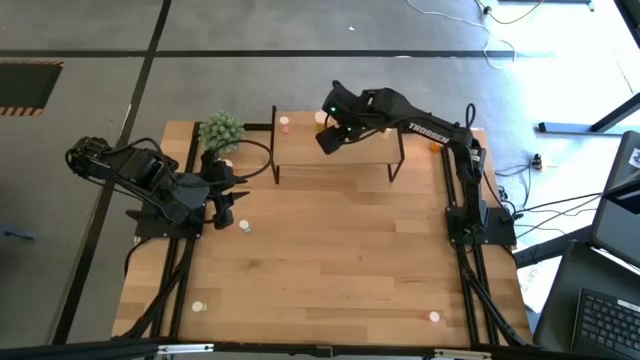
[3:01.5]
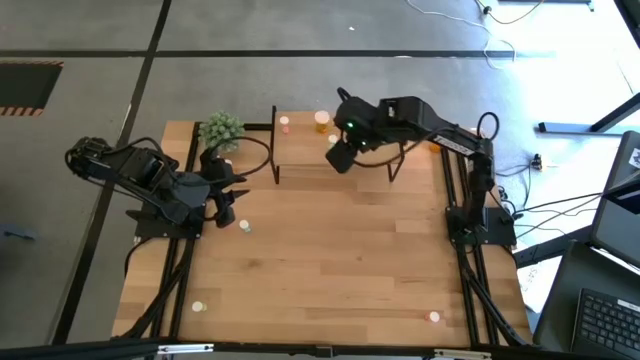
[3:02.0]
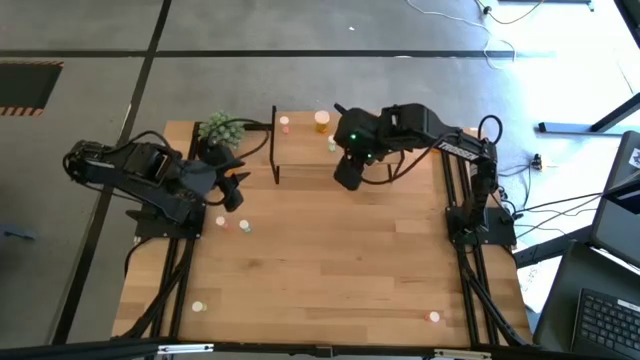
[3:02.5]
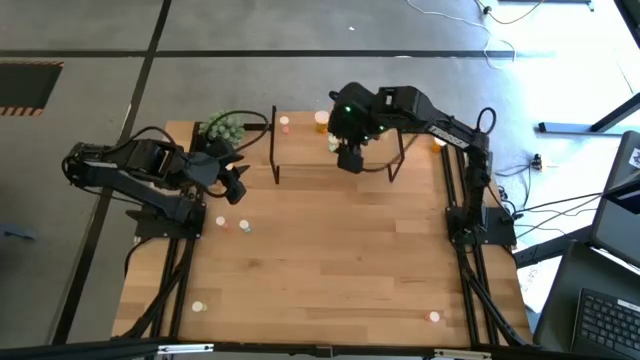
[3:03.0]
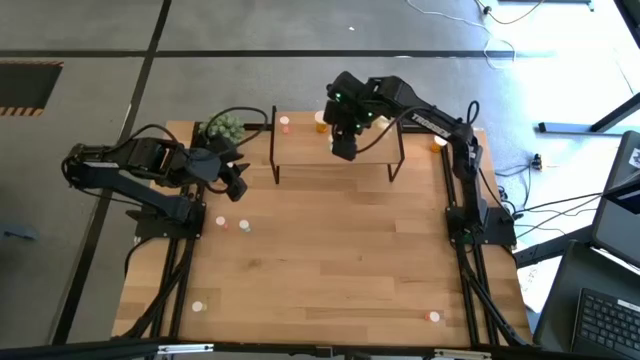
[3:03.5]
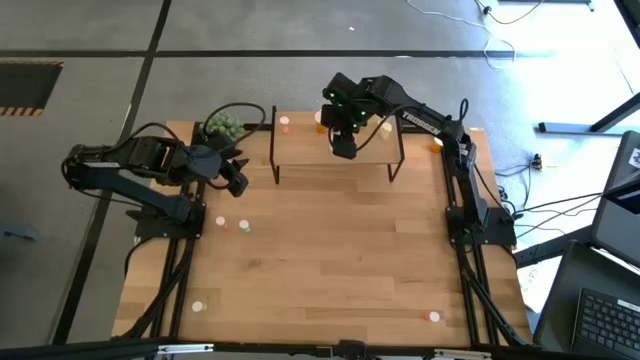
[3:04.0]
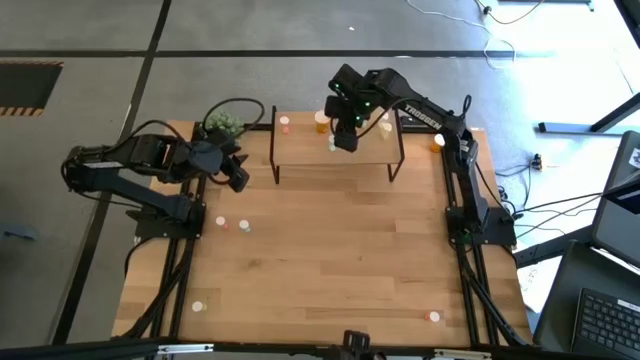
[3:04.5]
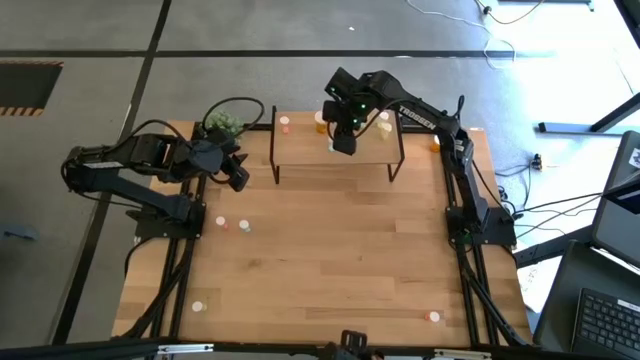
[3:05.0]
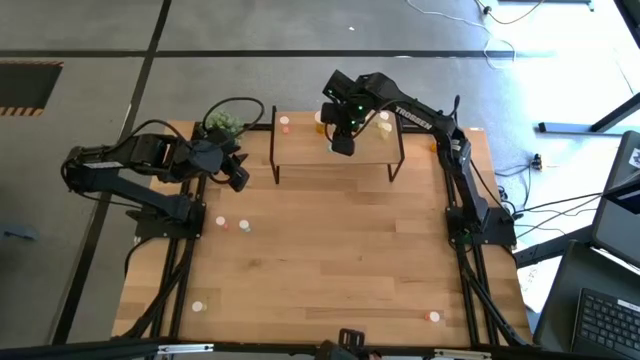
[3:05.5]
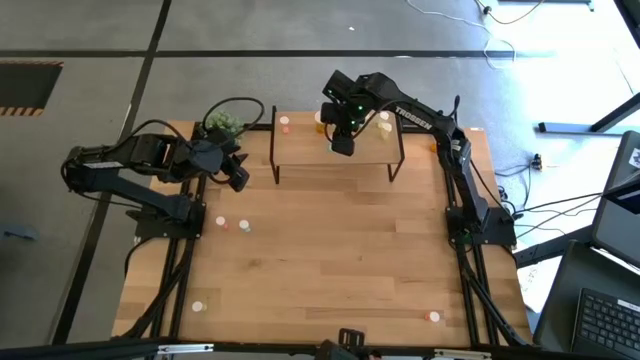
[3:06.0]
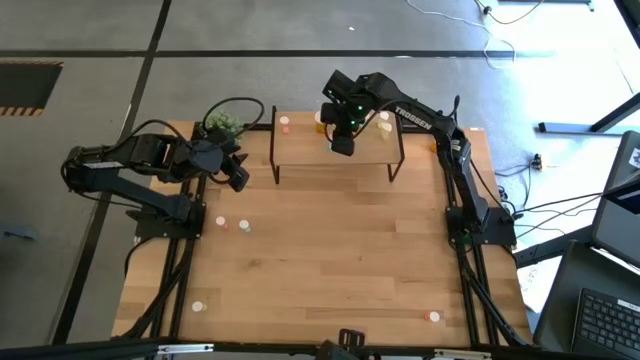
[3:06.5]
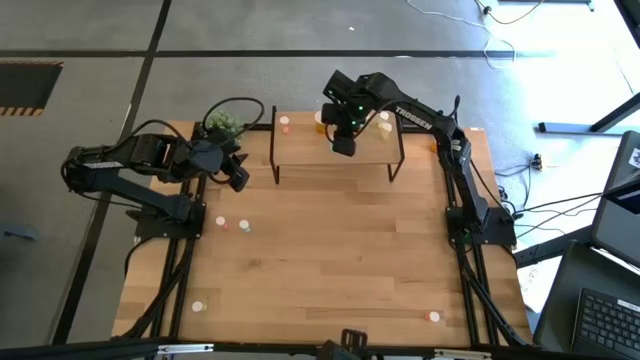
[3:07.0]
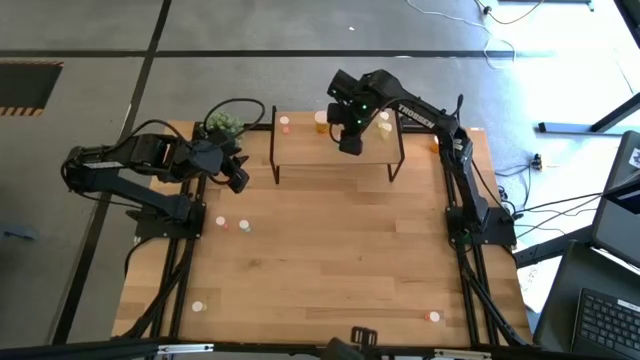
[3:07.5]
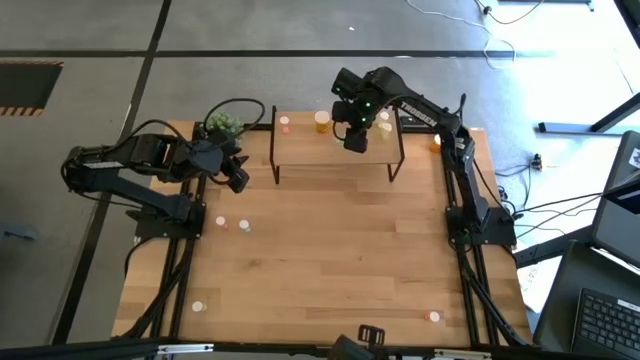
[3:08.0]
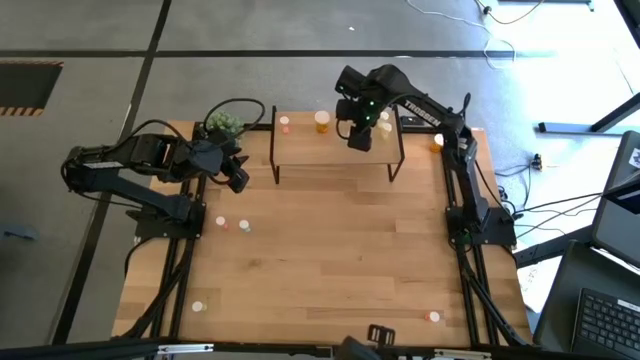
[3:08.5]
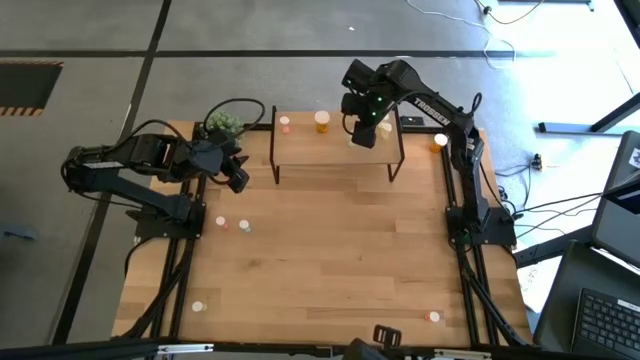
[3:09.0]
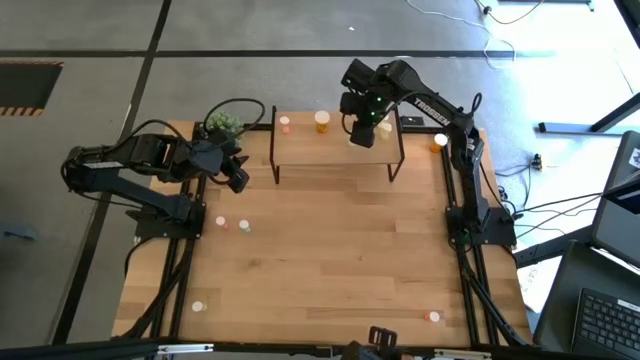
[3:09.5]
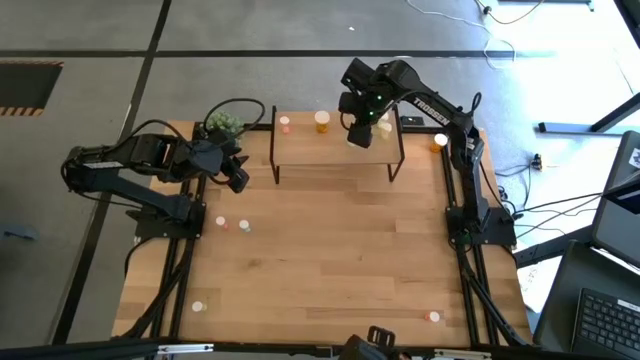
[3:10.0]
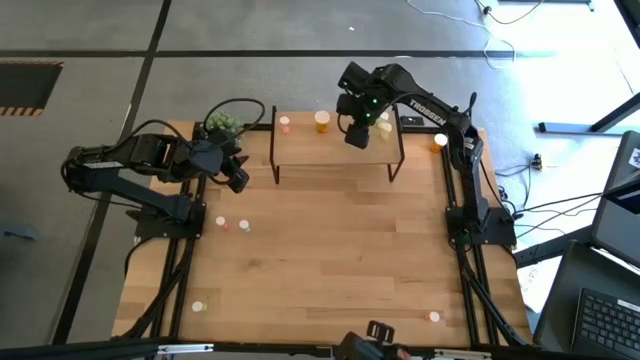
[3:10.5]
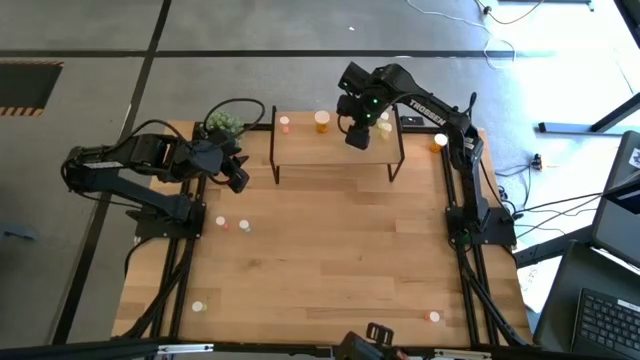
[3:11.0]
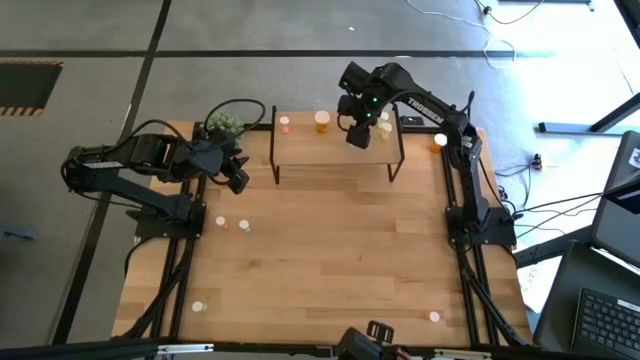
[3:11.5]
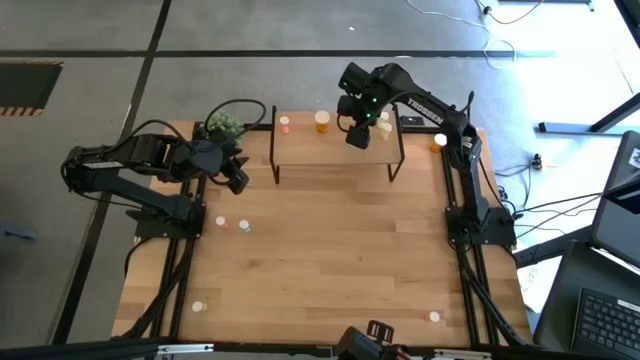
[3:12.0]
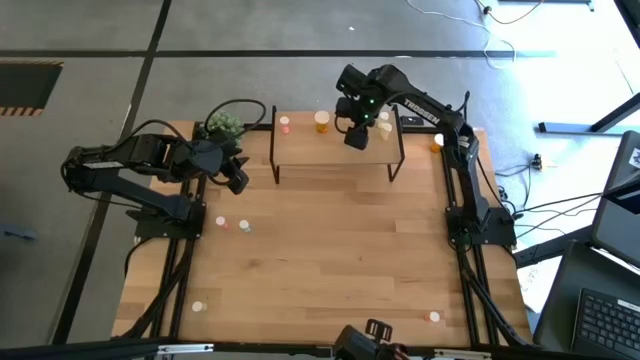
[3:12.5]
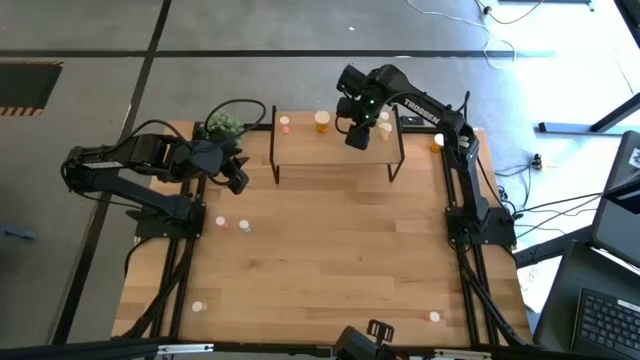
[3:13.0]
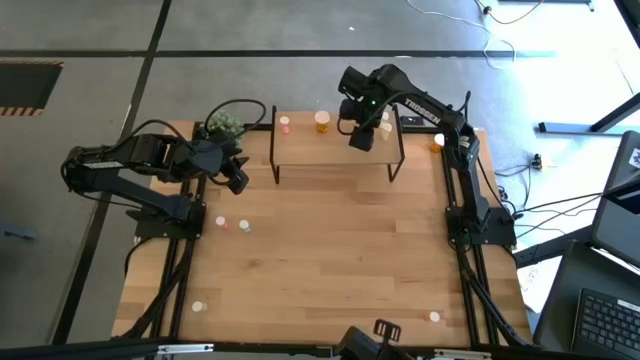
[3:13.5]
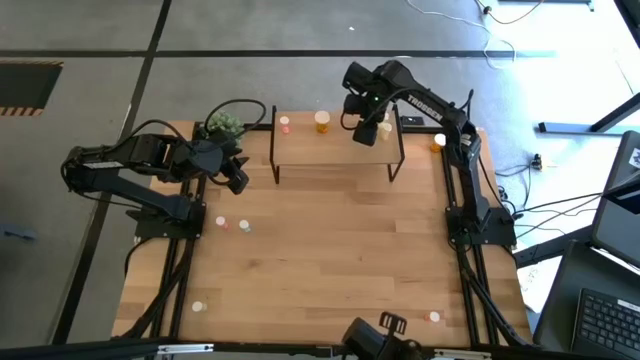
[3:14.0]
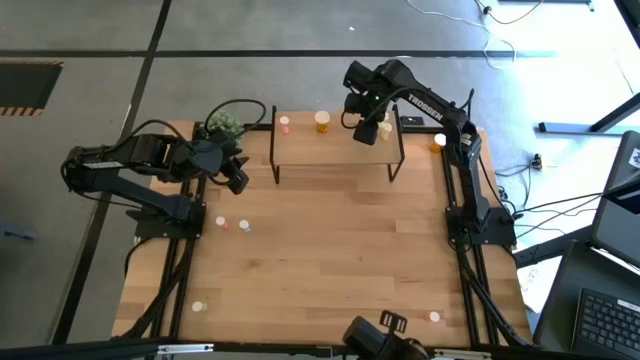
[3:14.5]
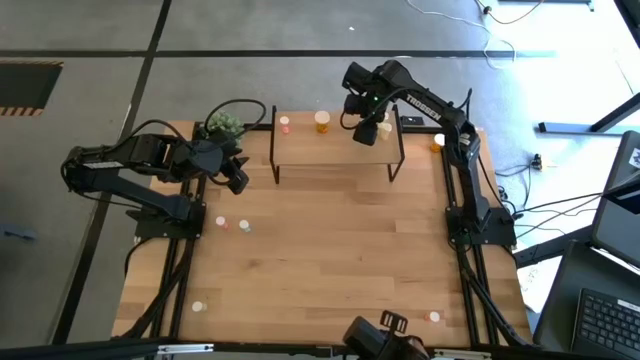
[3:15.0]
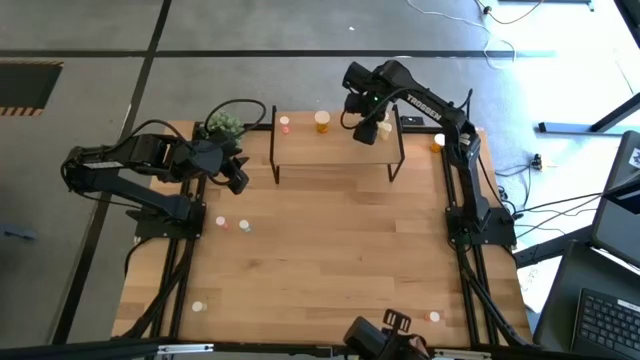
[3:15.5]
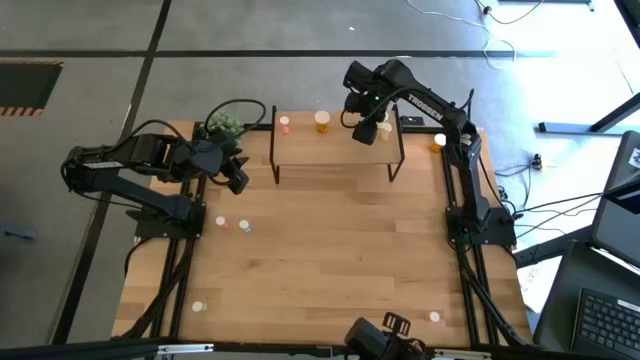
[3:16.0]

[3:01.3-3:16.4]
Task: Pick and place medicine bottles onto shelf by color
Adjust the blue medicine bottle on the shelf to align with the other blue medicine bottle

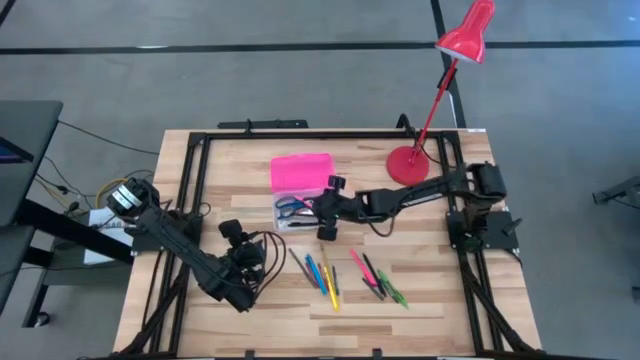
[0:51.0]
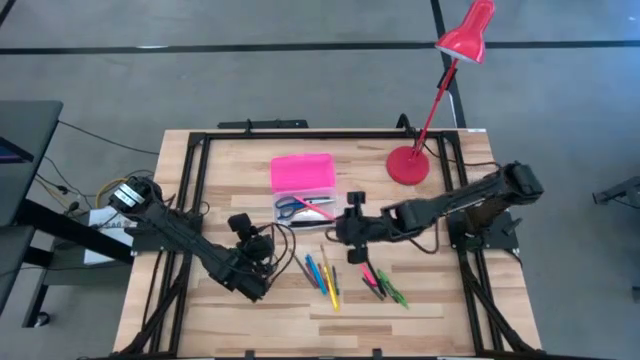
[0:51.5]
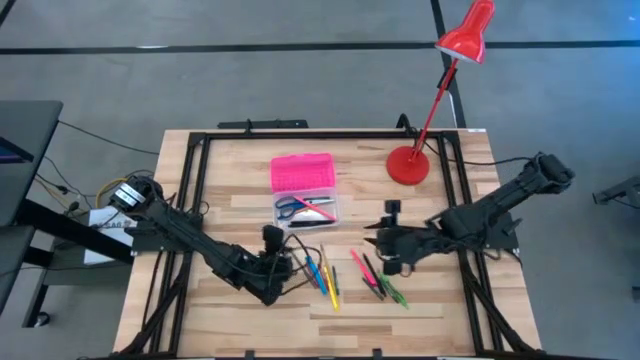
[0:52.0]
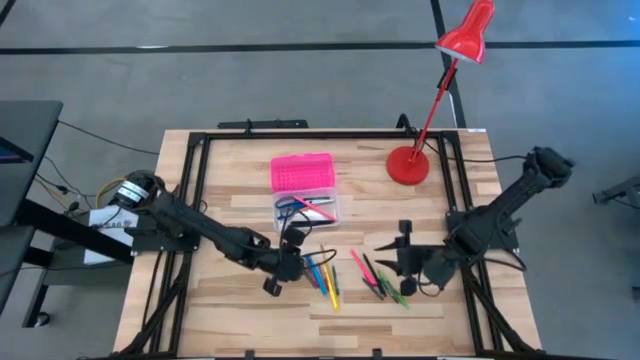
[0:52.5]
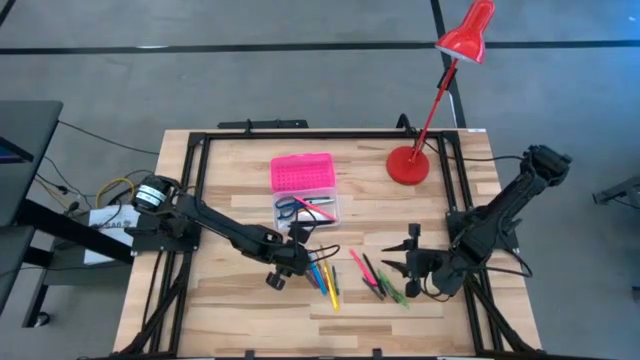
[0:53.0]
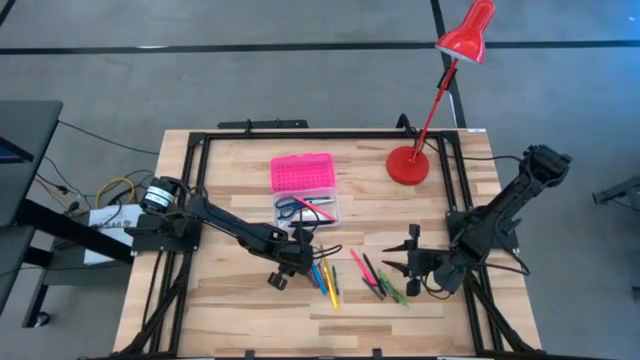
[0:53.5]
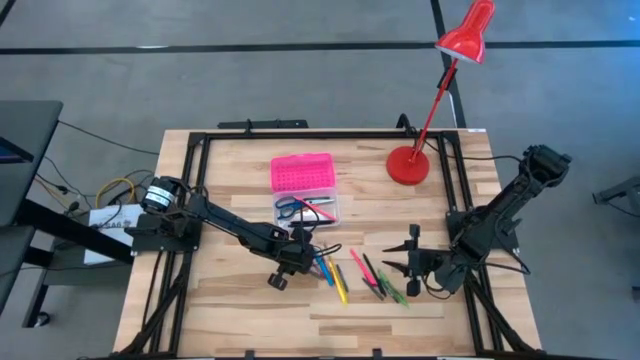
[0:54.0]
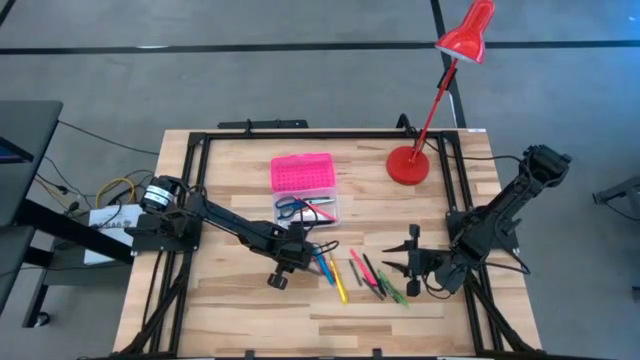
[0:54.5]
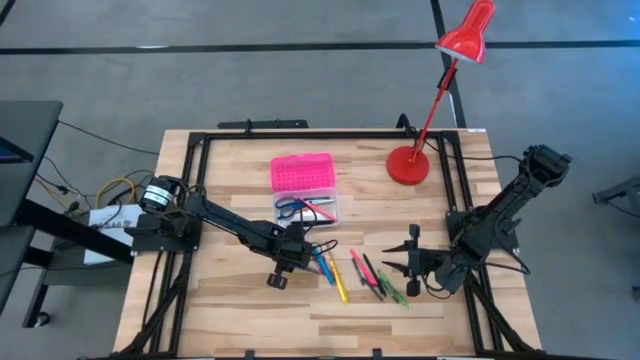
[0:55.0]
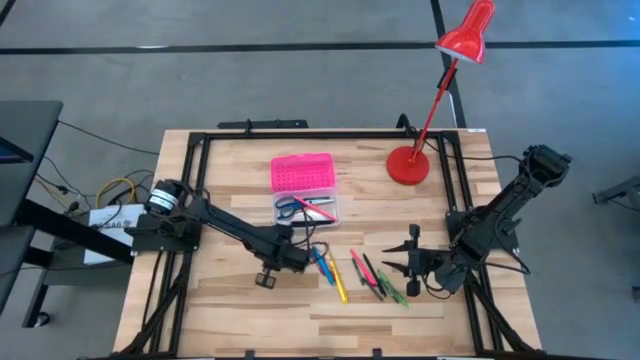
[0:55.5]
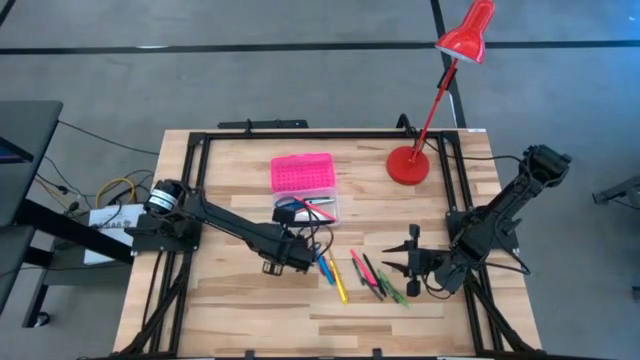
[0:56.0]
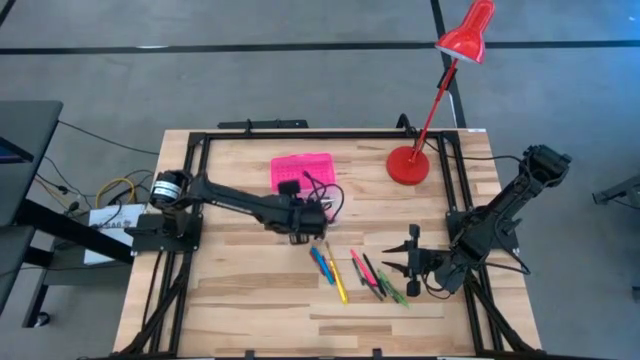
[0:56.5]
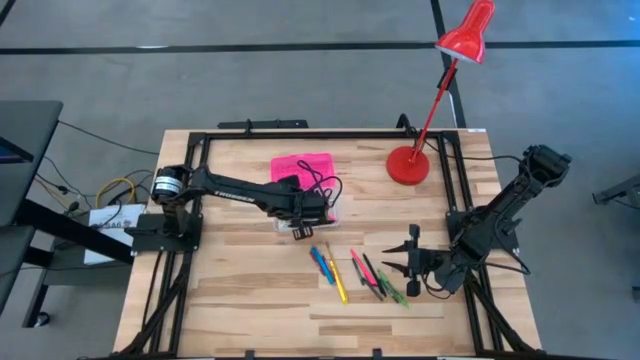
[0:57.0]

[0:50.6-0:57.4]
Task: Pick & place school supplies into a supply box
Put the gray pen into the pink supply box
